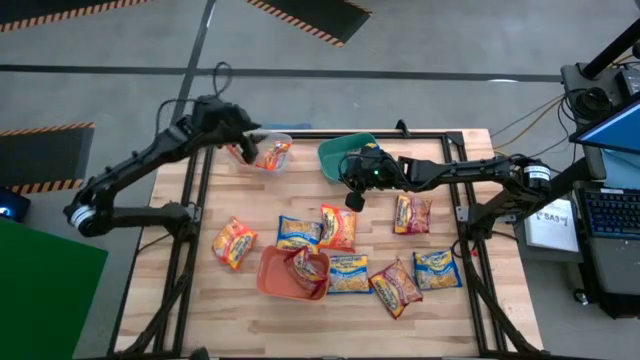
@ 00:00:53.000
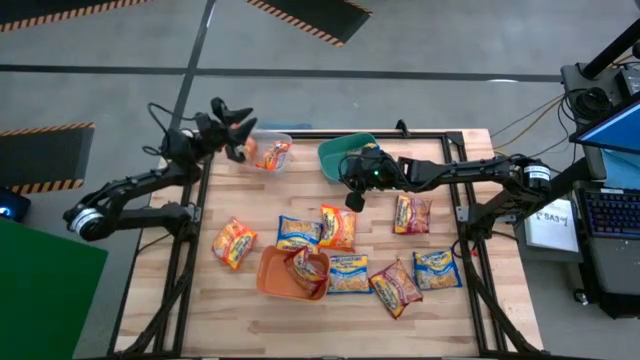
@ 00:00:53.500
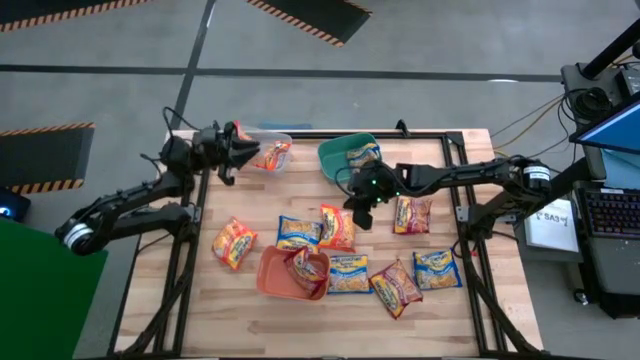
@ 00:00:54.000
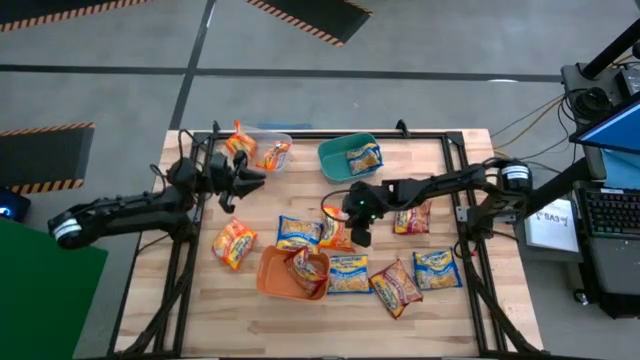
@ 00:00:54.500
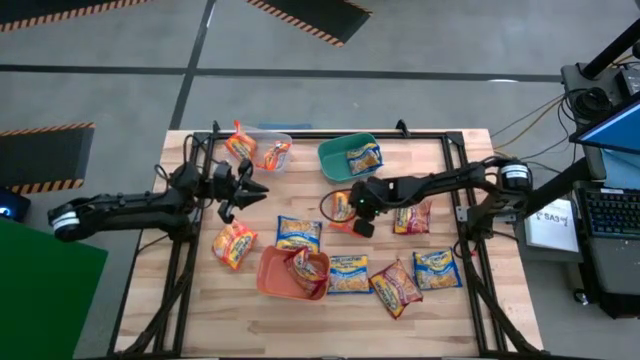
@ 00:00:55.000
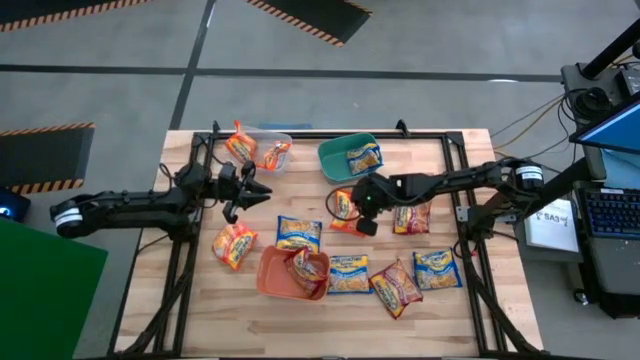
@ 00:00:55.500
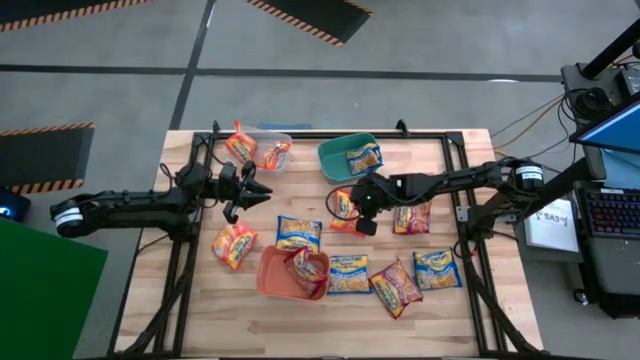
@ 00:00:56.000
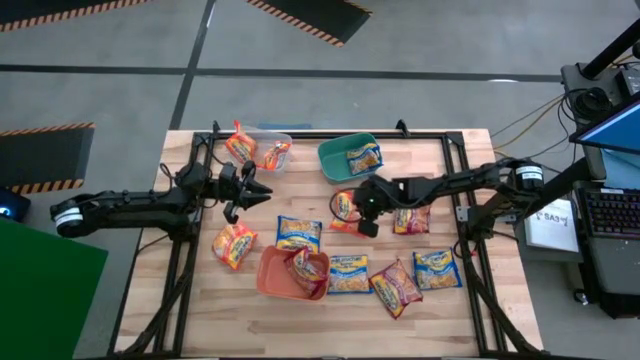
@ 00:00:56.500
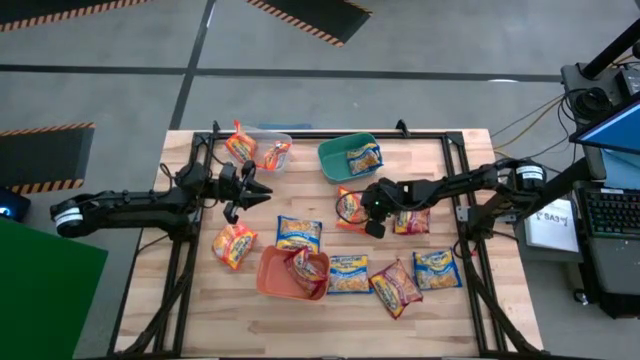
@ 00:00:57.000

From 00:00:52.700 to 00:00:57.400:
Task: Sort Maruchan noodles
Adjust the orange noodle pack

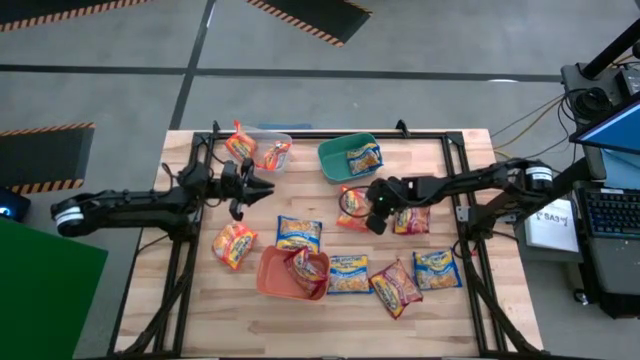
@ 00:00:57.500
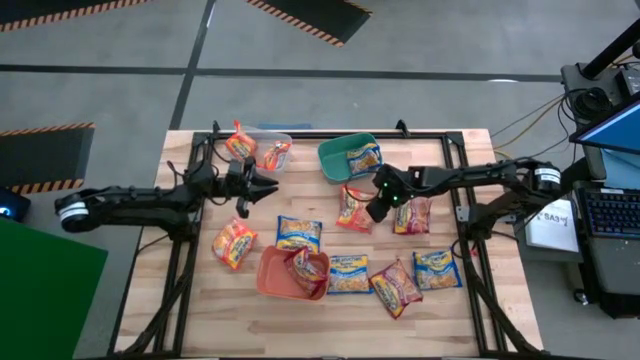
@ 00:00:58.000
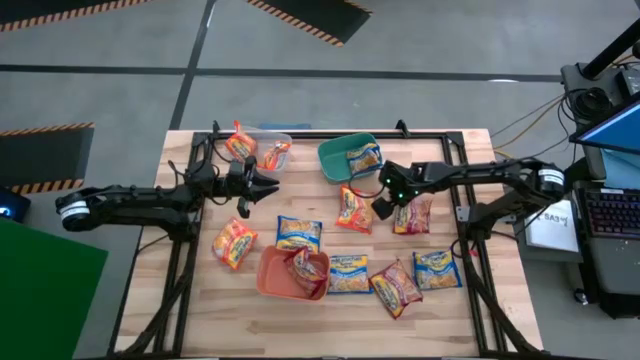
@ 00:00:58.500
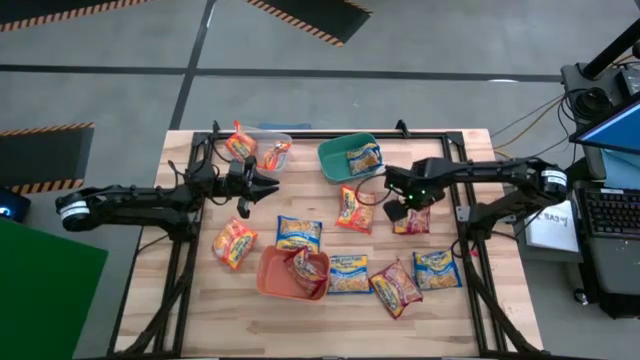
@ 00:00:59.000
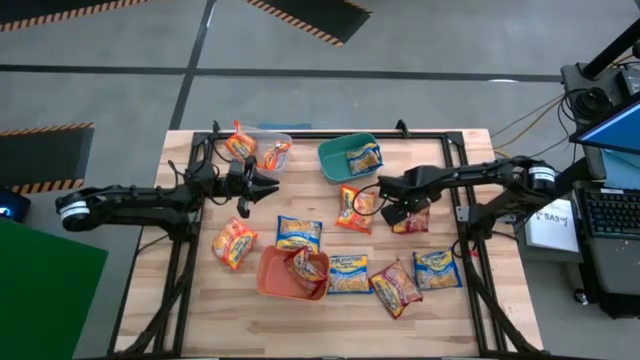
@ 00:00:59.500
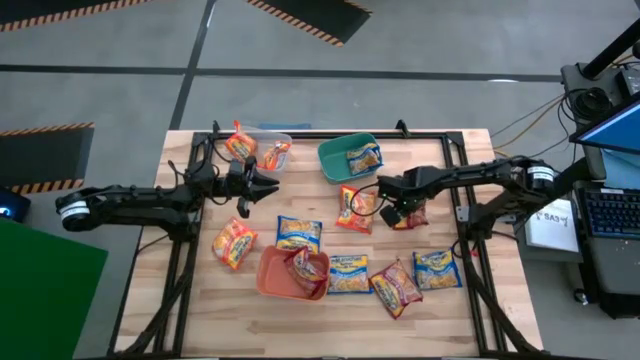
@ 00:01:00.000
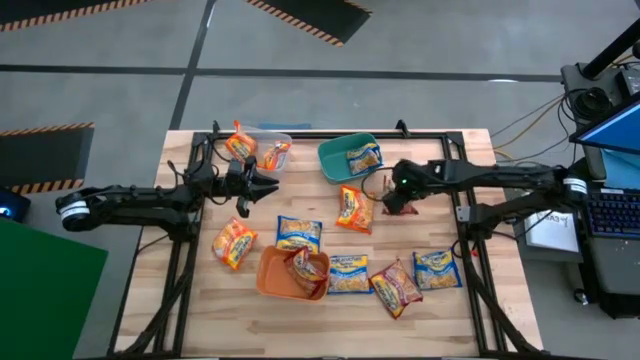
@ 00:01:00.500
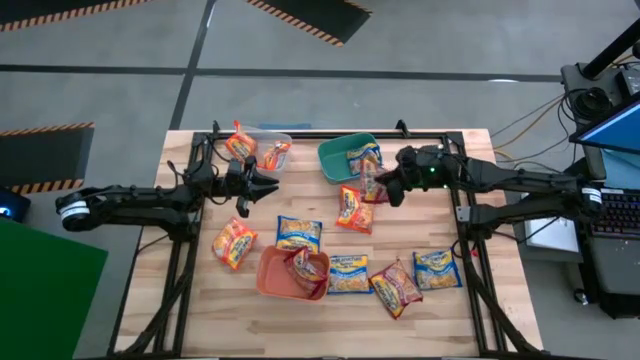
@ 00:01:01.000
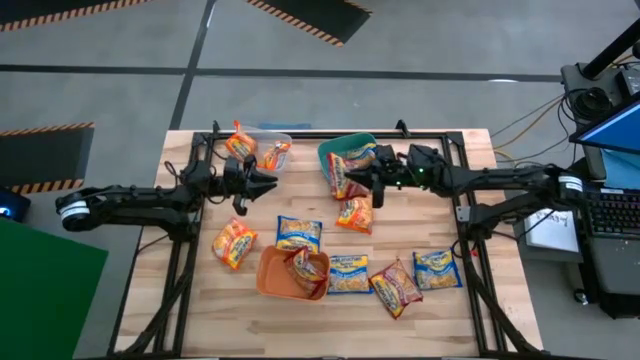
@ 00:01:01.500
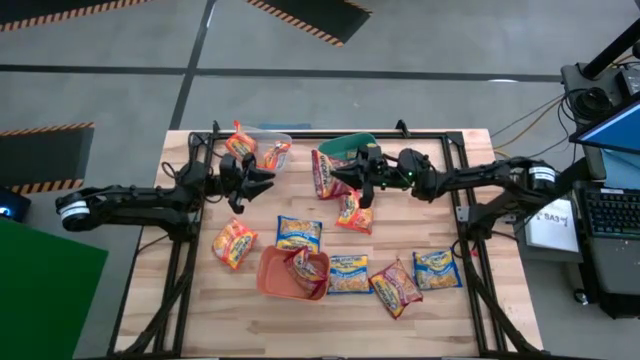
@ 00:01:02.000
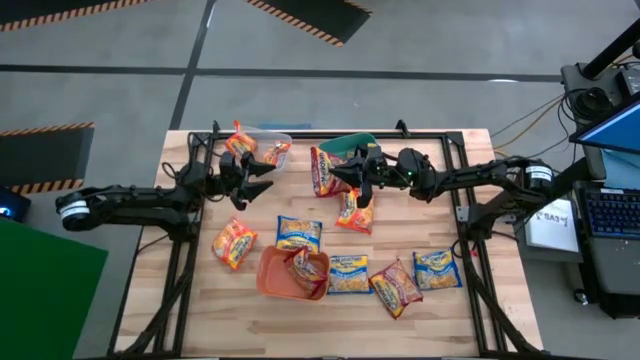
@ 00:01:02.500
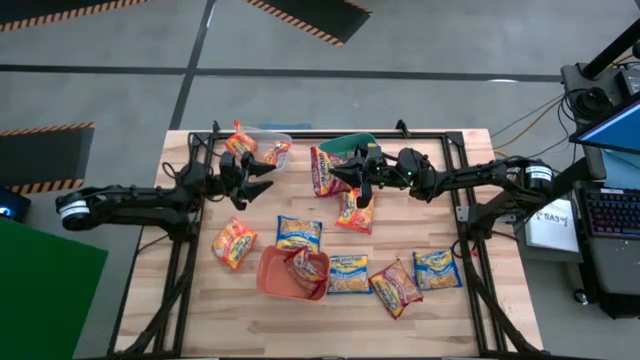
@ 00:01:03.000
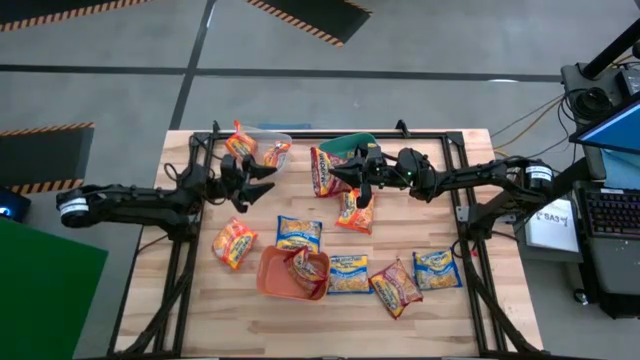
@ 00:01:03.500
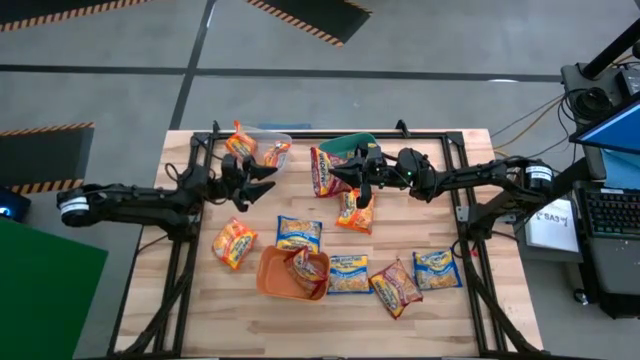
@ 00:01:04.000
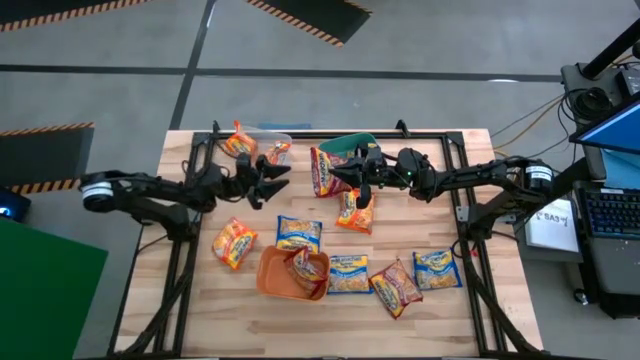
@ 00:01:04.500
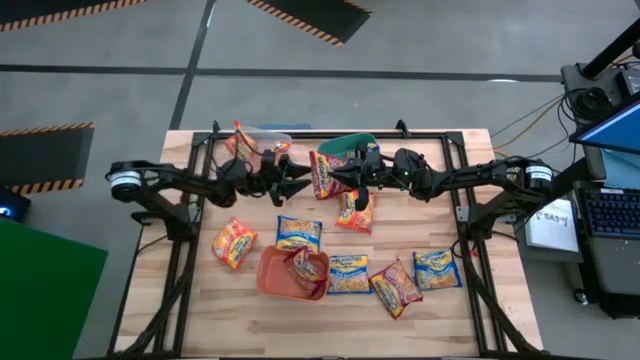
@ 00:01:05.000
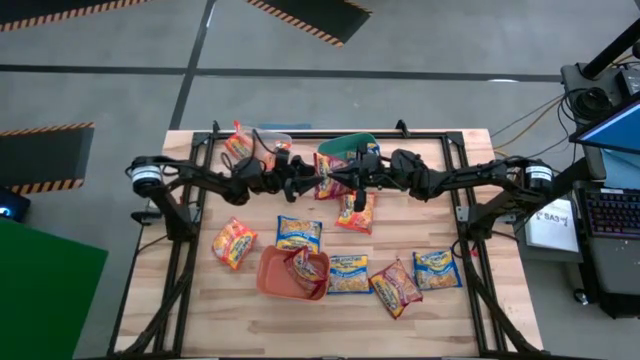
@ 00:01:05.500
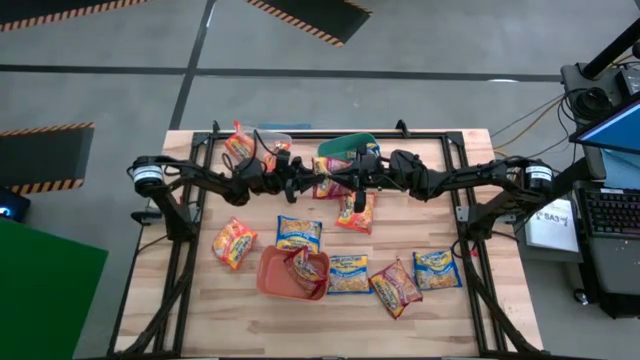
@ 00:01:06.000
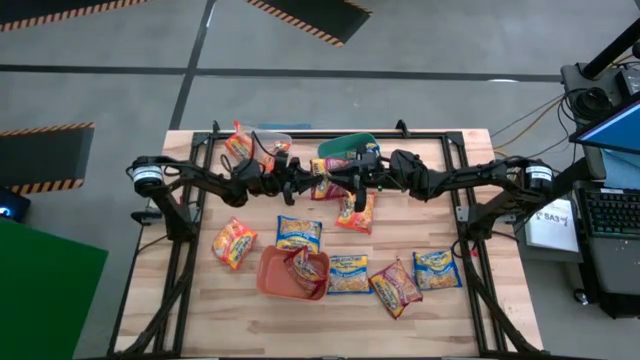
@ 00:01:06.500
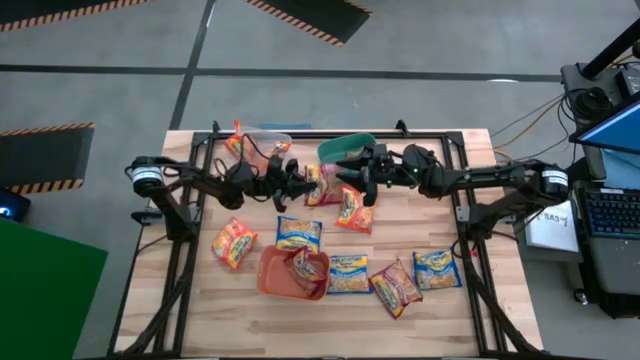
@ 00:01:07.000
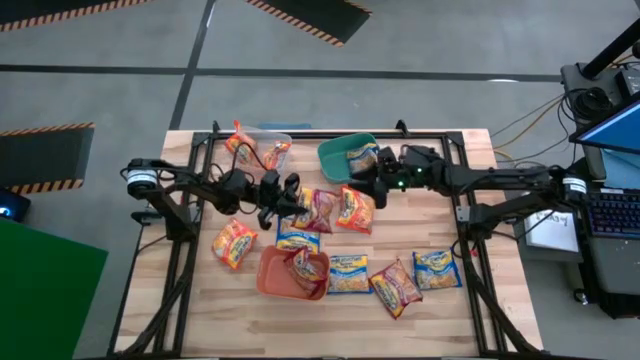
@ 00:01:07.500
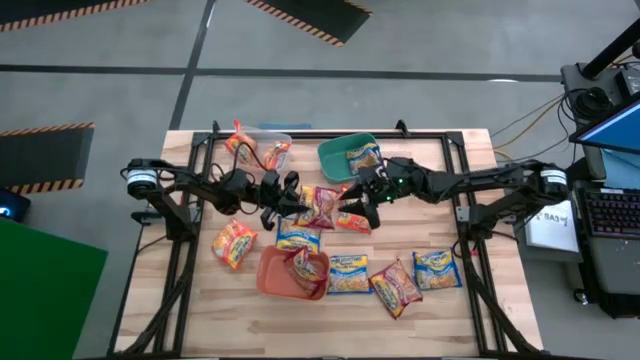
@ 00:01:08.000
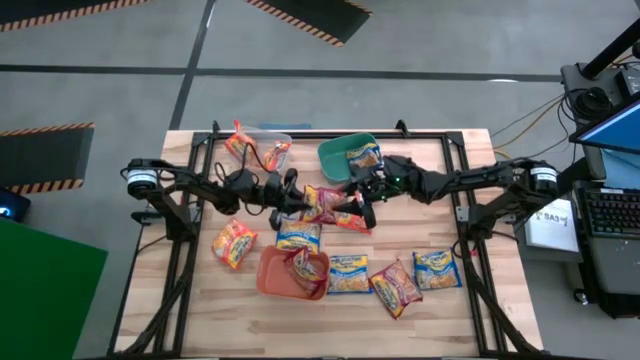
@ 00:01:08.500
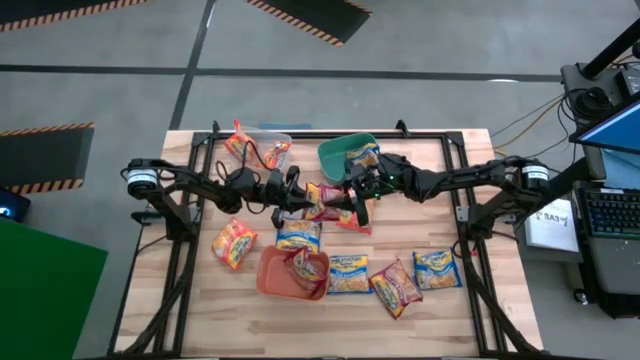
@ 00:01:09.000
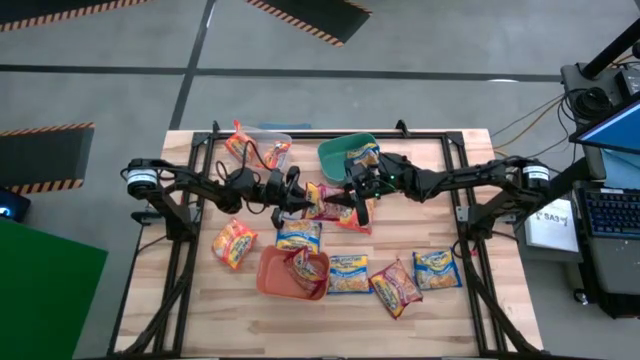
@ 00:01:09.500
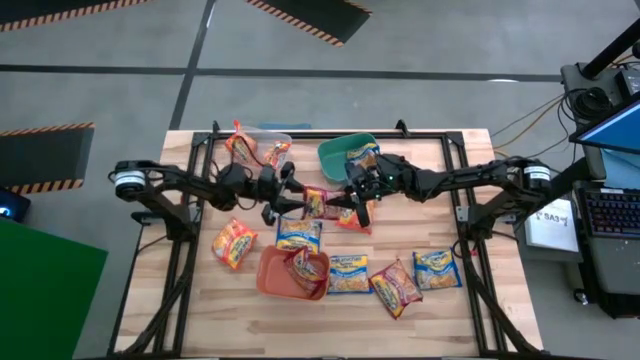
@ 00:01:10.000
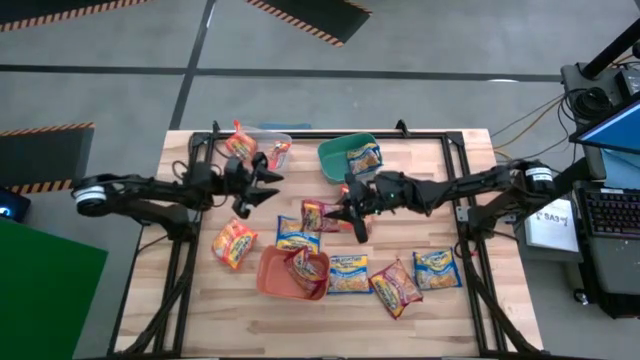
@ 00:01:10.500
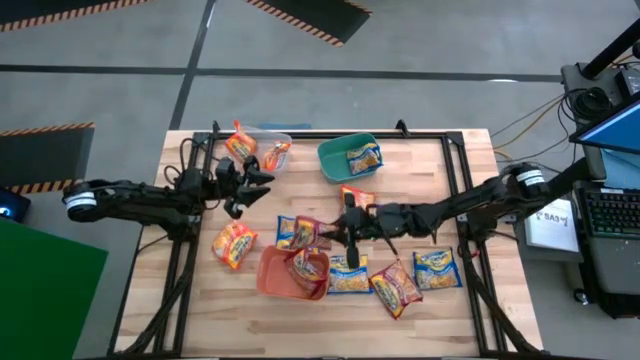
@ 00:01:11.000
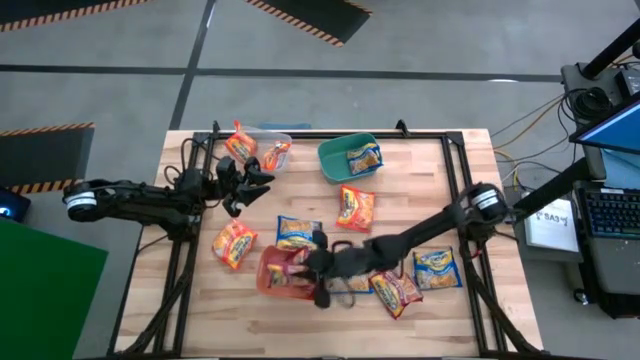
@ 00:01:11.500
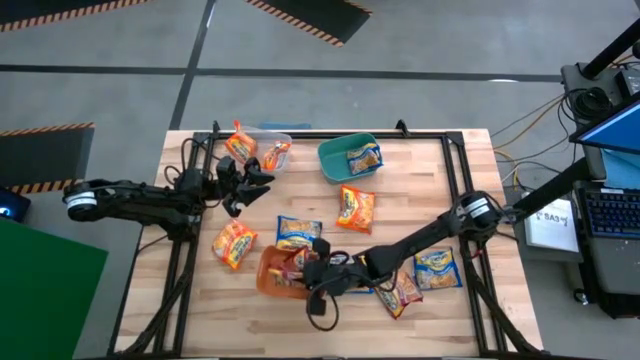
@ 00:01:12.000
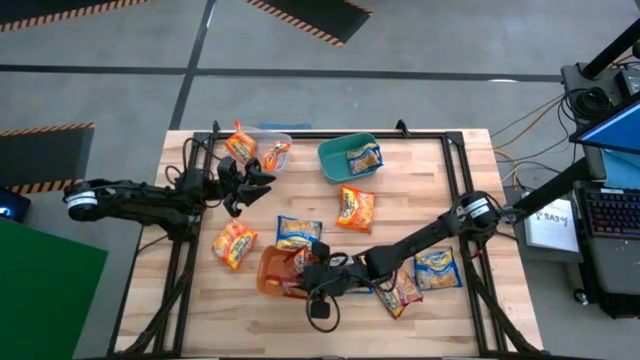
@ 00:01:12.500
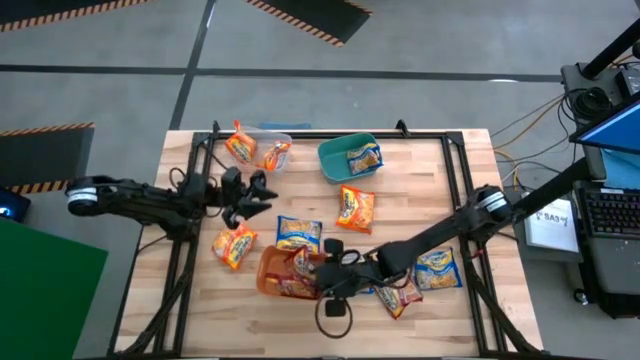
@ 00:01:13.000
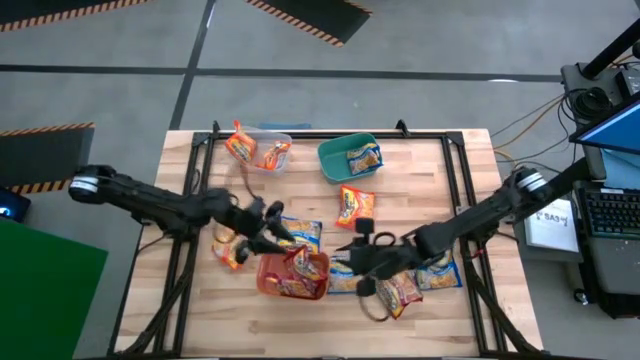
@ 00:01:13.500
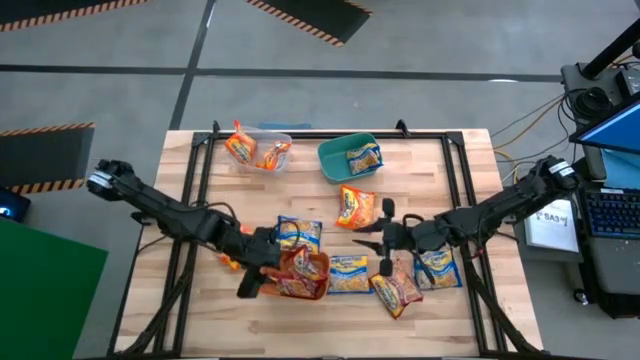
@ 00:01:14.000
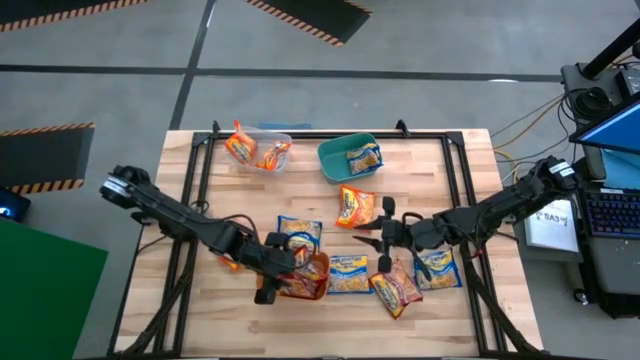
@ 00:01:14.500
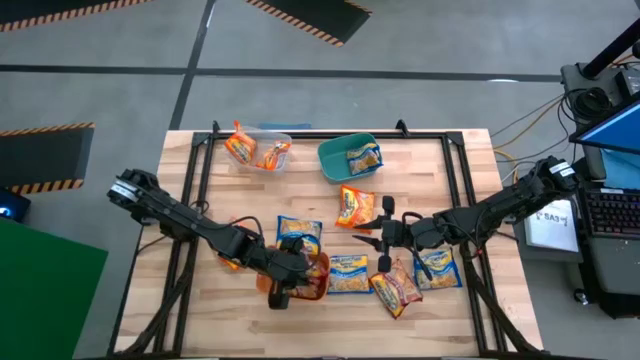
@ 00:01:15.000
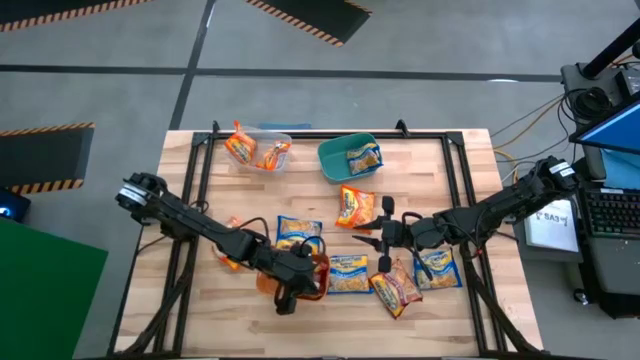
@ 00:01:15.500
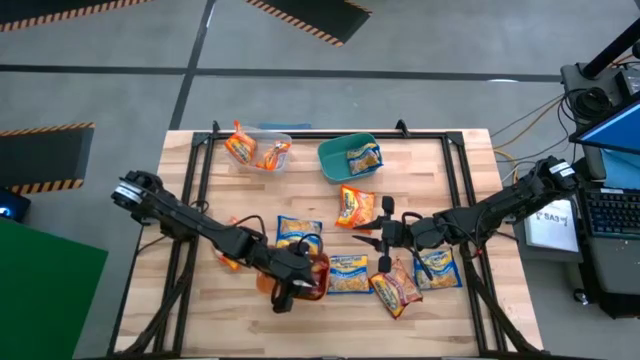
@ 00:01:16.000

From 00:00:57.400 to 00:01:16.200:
Put the red noodle pack into the orange bin
